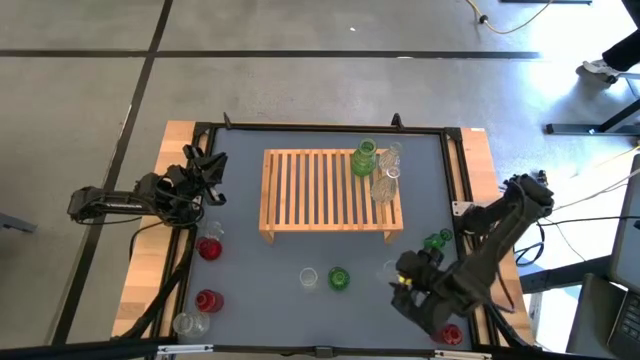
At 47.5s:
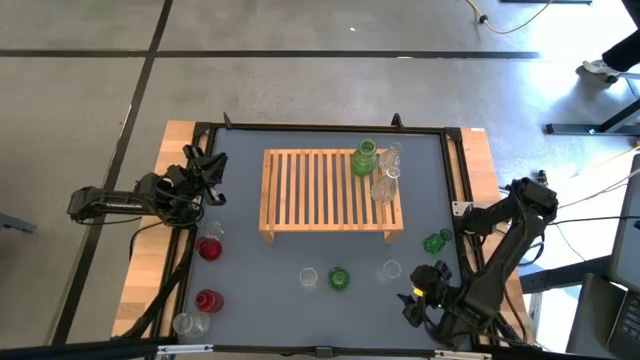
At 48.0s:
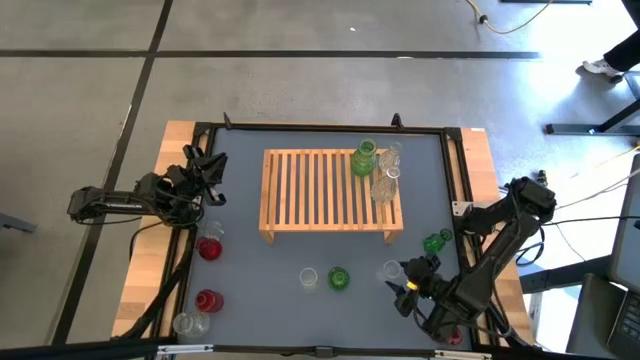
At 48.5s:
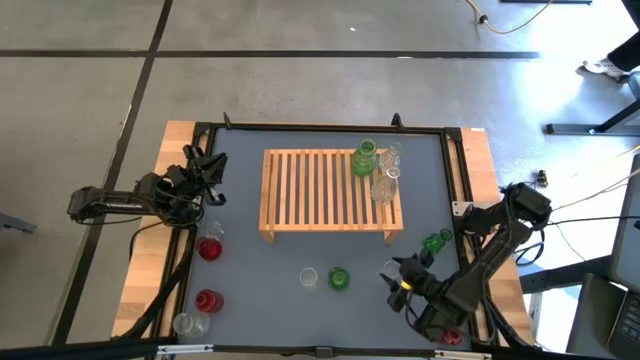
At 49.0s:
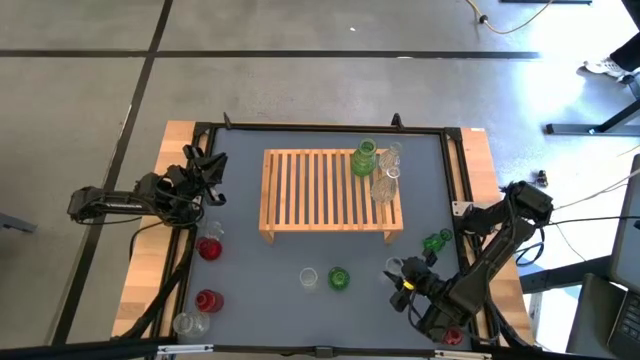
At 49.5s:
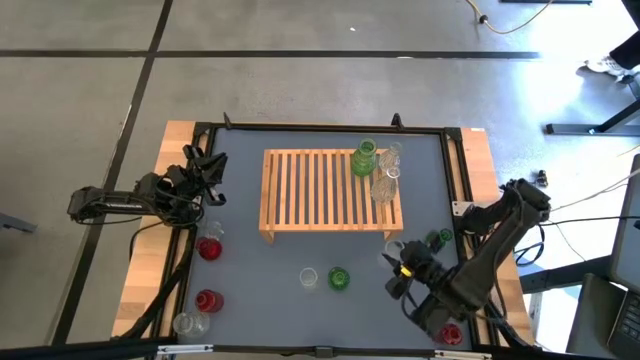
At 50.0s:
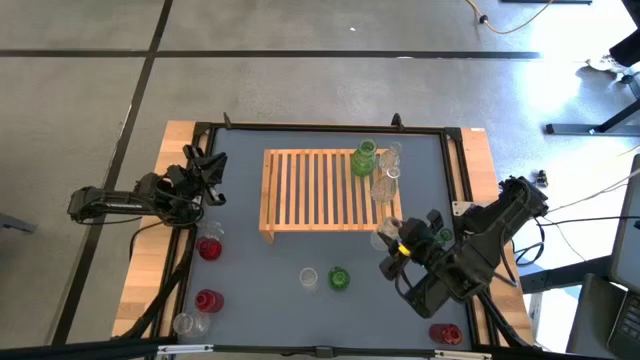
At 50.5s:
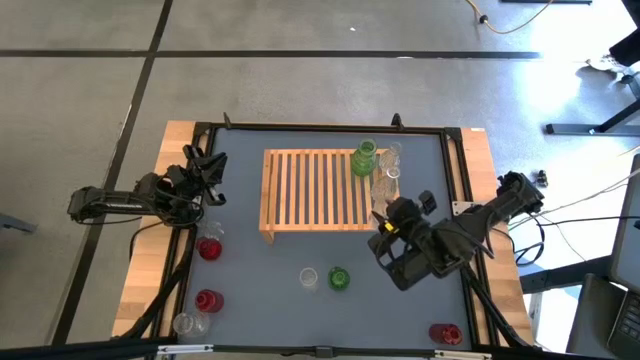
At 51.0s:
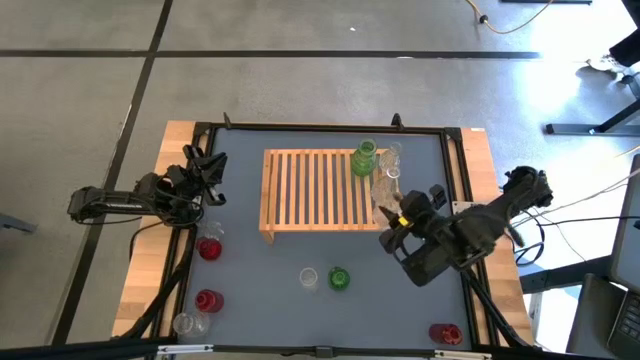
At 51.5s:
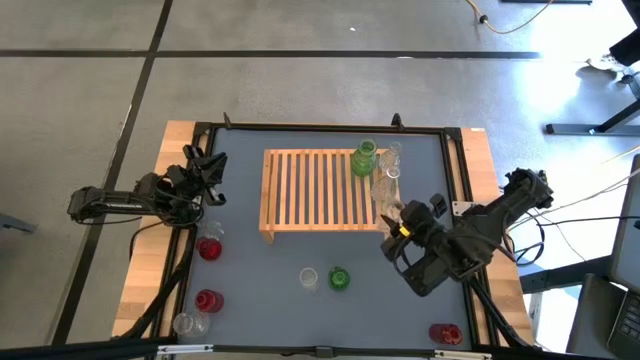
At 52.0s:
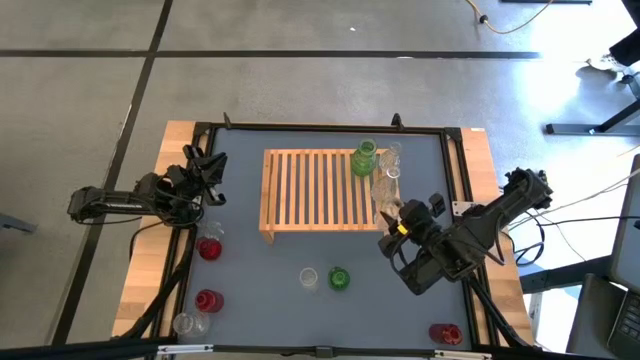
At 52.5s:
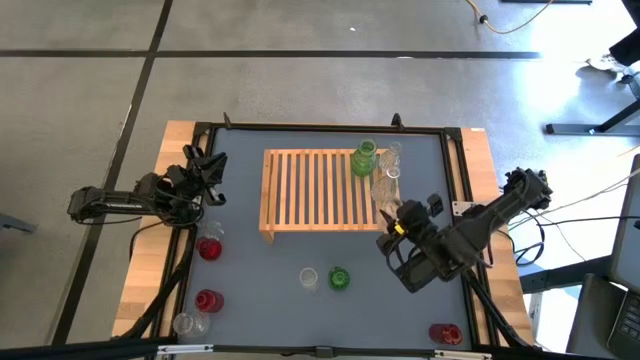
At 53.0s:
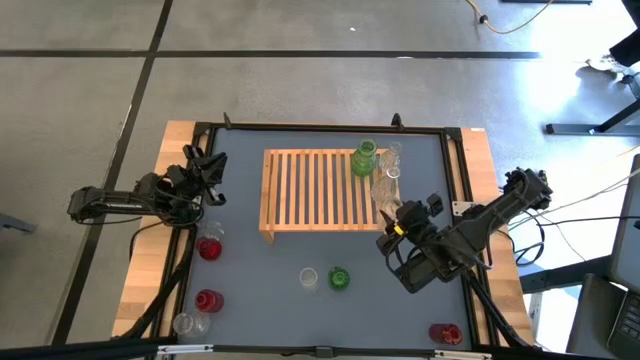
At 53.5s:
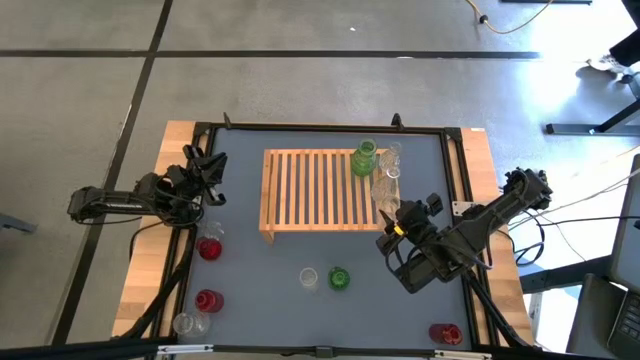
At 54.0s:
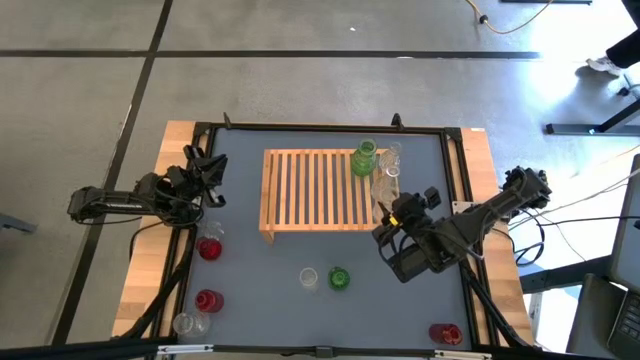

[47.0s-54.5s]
Task: sort vases onto shelf
Put the transparent bottle on the shelf

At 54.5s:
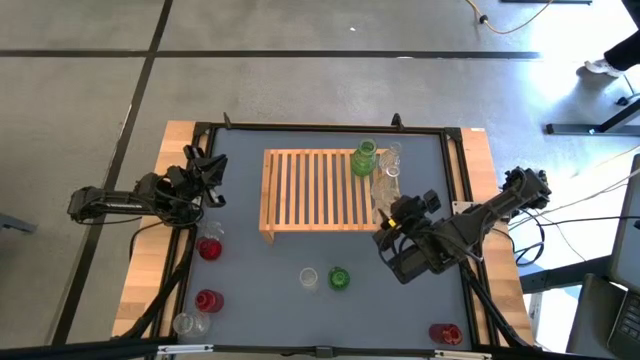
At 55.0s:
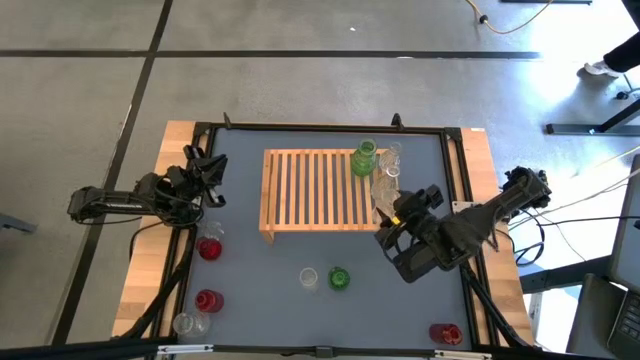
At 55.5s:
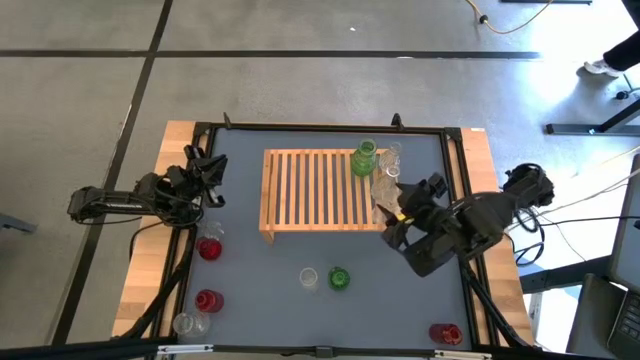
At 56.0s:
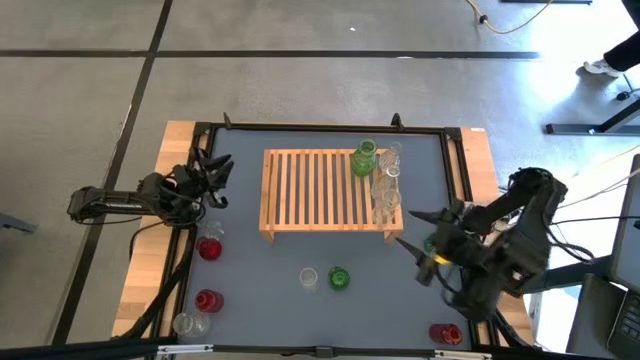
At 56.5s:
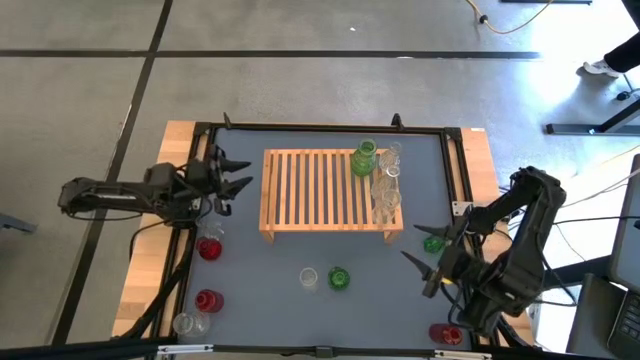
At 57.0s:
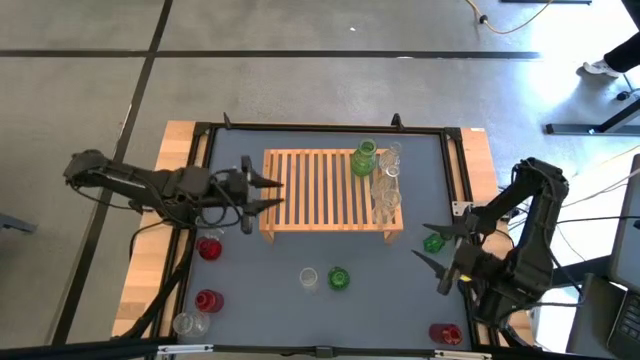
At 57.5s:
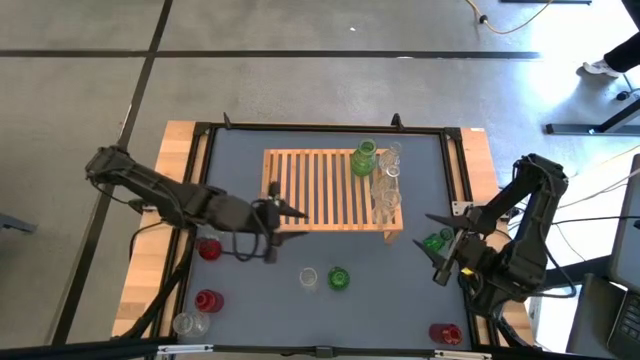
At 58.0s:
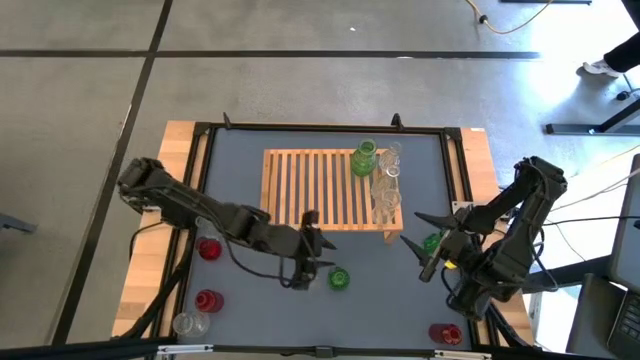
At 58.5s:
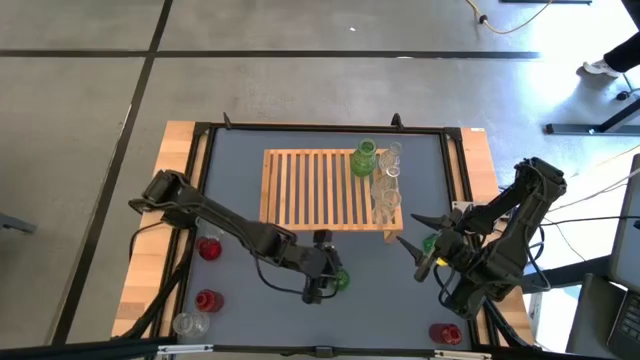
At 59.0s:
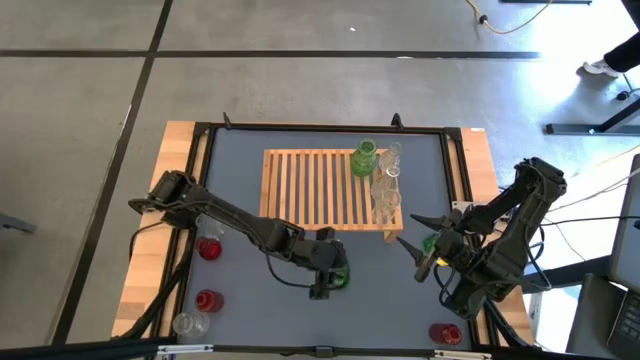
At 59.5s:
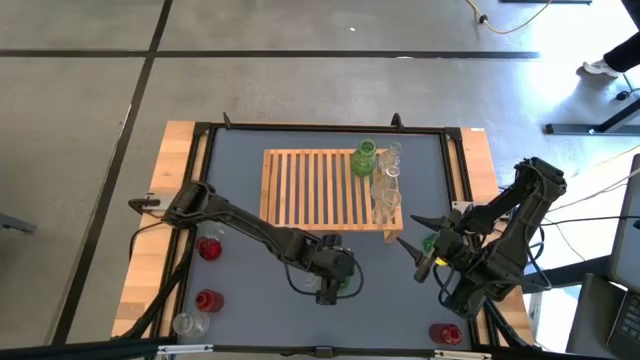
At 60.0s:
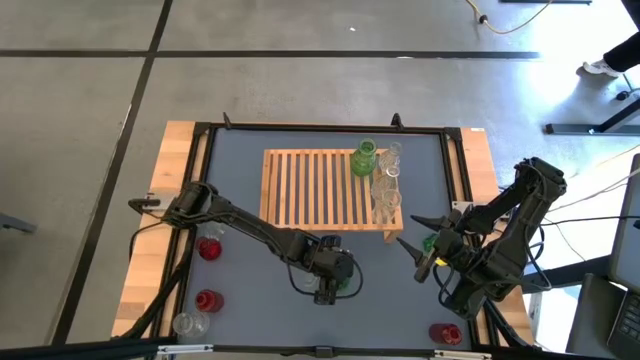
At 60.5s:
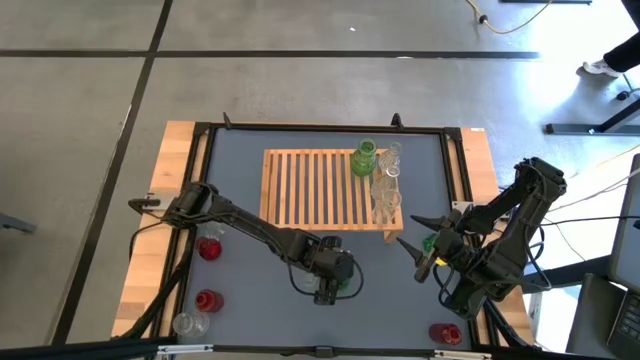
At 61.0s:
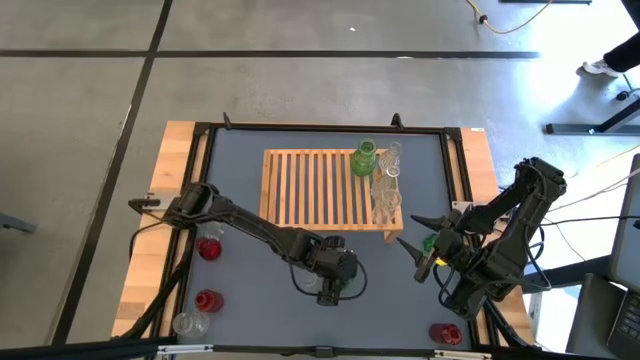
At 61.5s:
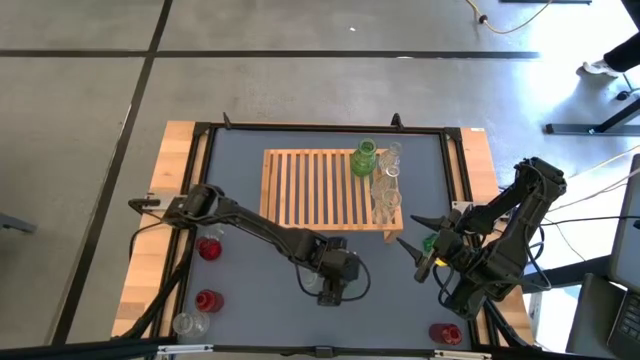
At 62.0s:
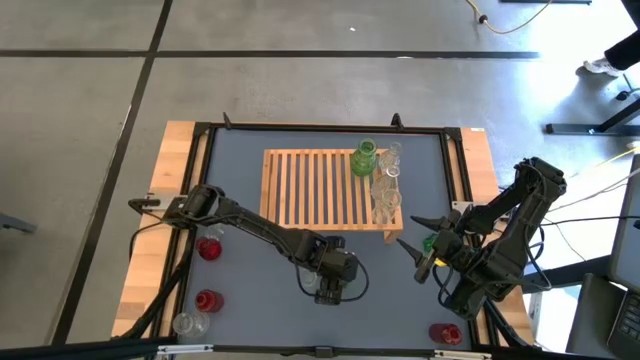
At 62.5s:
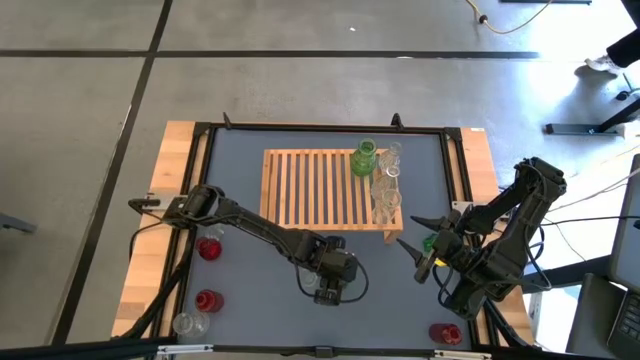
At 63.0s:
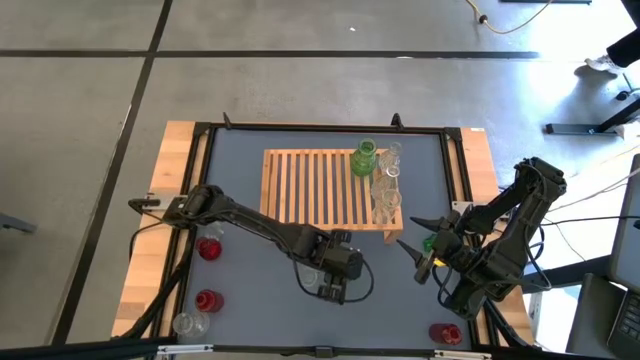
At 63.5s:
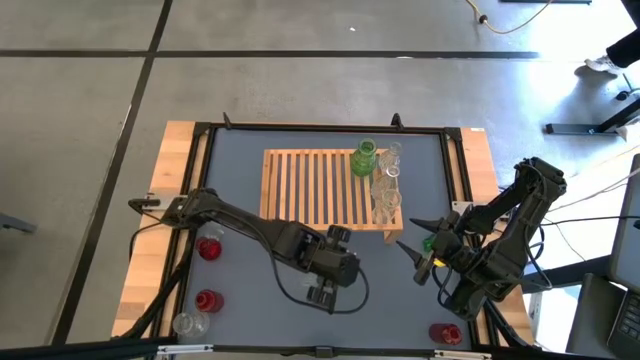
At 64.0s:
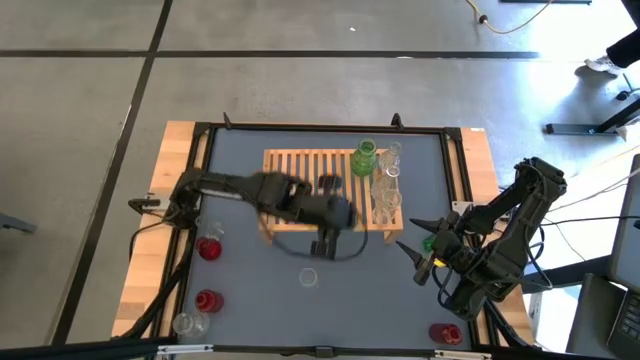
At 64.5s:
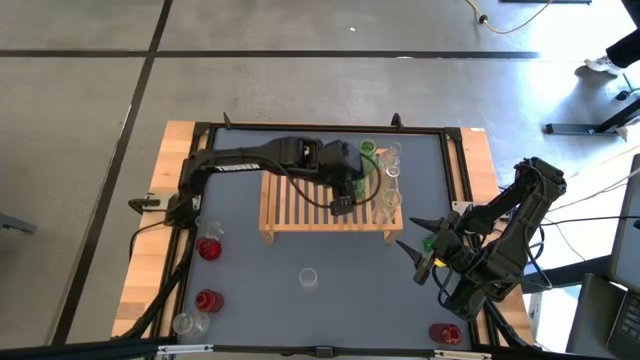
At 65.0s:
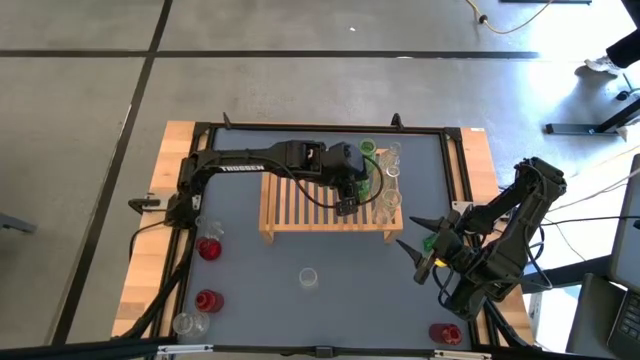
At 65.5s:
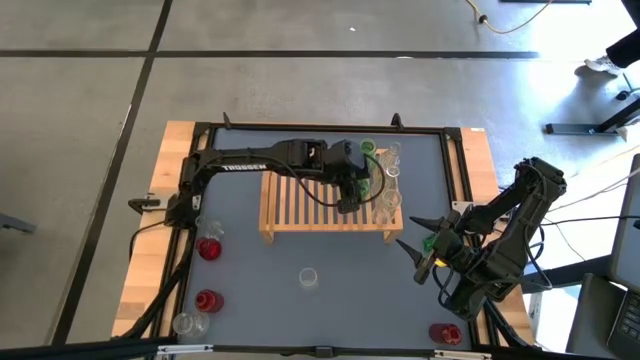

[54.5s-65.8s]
Put the bottom middle green bottle on the shelf

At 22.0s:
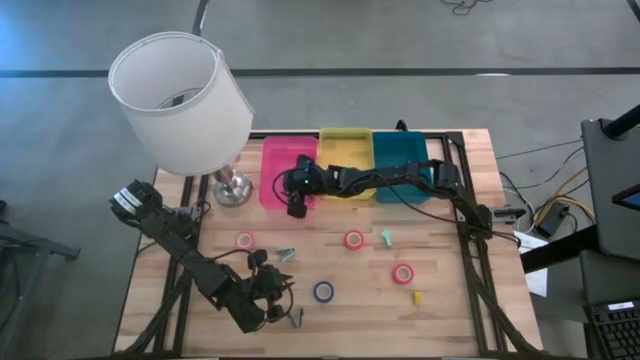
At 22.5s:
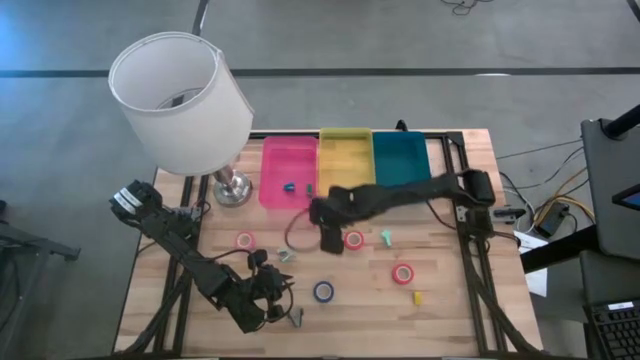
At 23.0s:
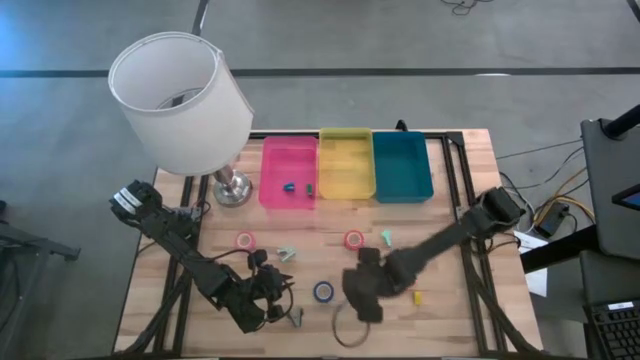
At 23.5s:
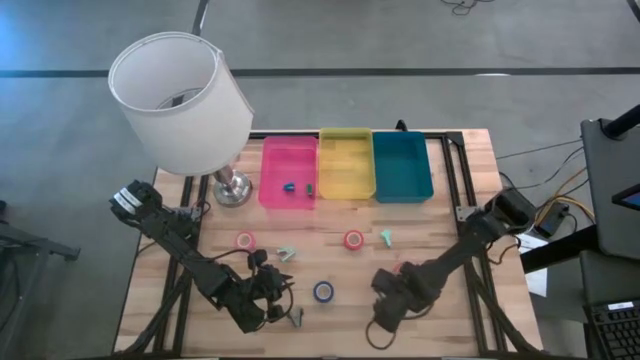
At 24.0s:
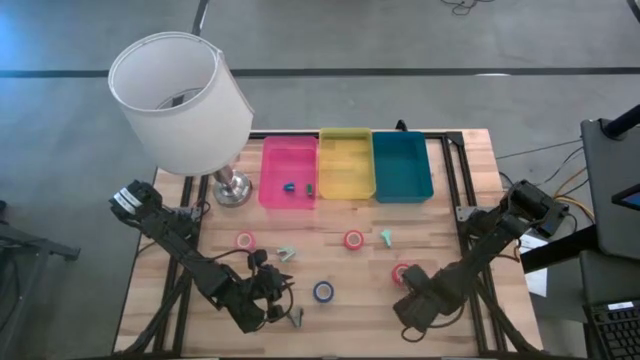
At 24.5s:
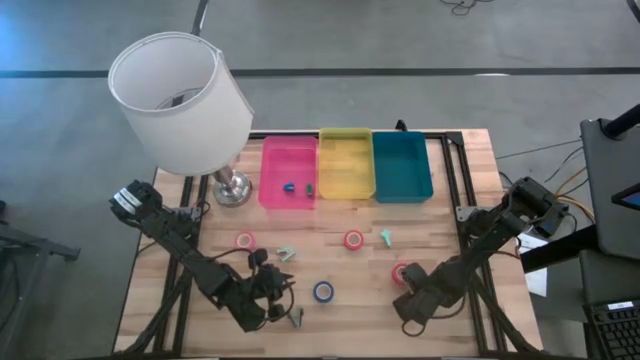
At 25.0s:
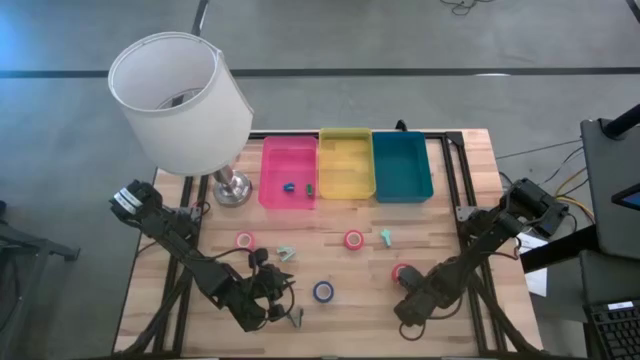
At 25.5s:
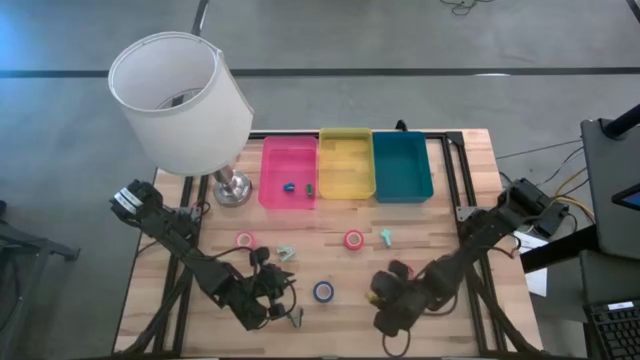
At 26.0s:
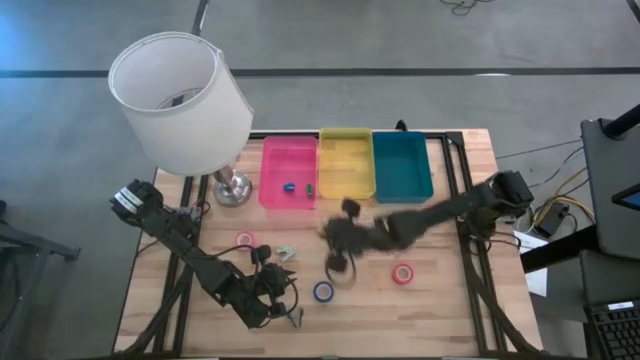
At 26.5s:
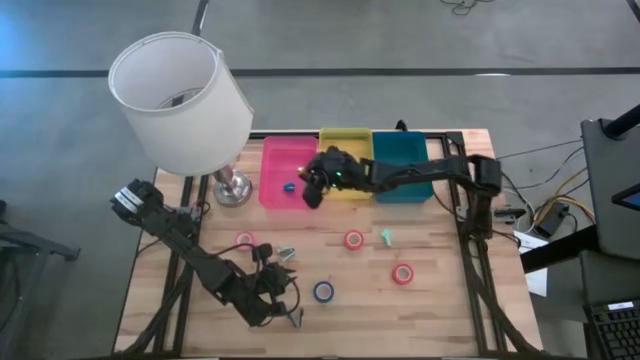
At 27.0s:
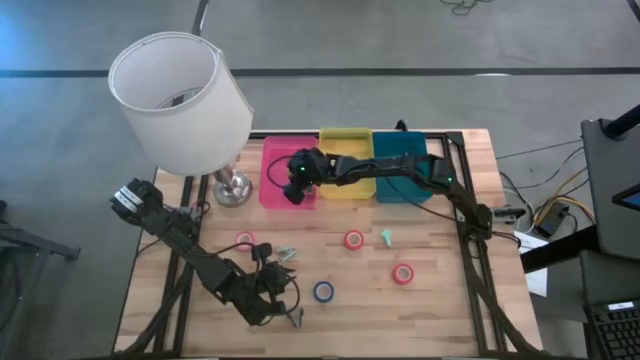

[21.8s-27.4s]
Task: Pick and place Stapler, Stapler remover, tape
Put the yellow stapler into the pink bin
